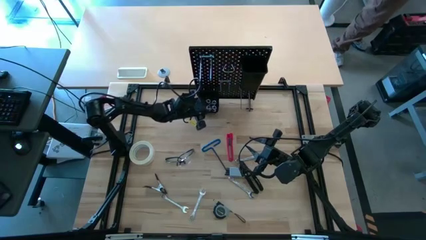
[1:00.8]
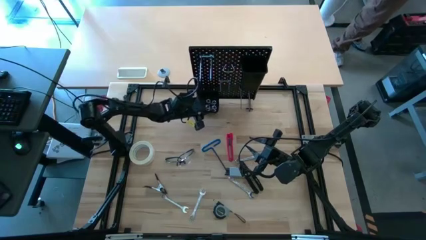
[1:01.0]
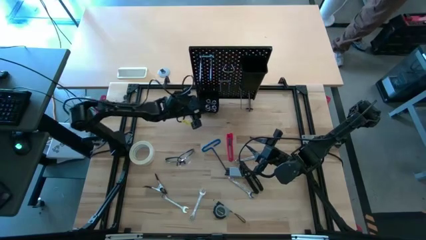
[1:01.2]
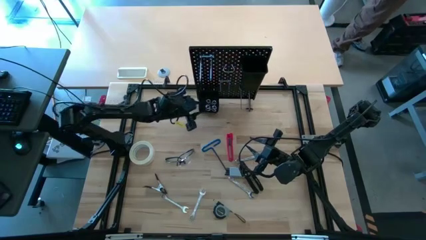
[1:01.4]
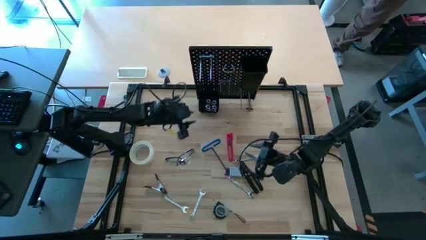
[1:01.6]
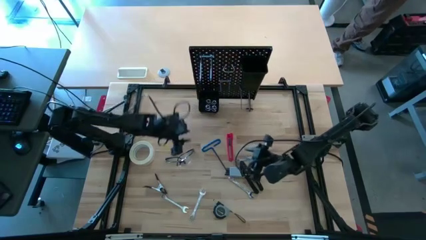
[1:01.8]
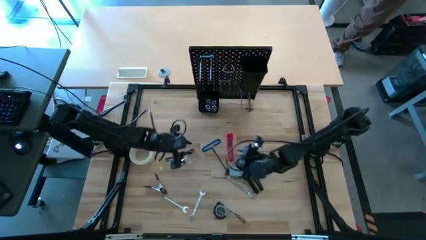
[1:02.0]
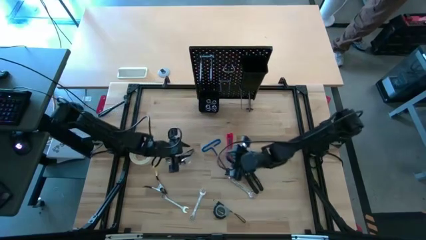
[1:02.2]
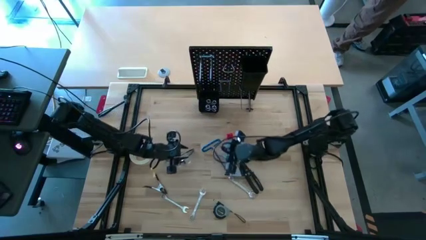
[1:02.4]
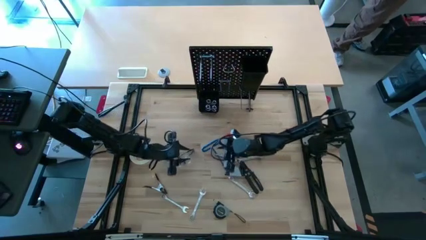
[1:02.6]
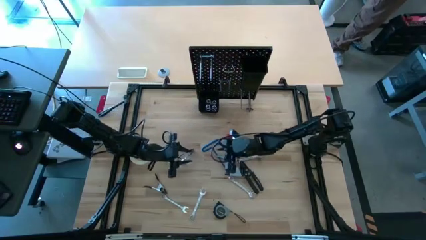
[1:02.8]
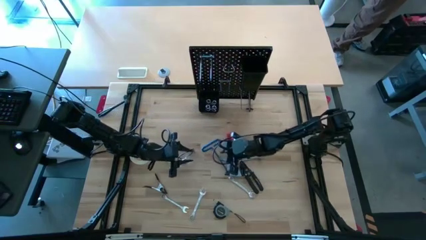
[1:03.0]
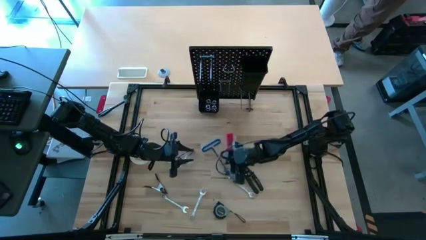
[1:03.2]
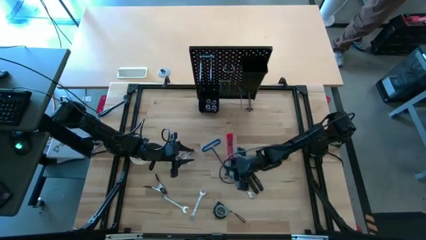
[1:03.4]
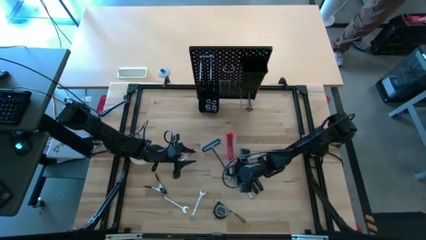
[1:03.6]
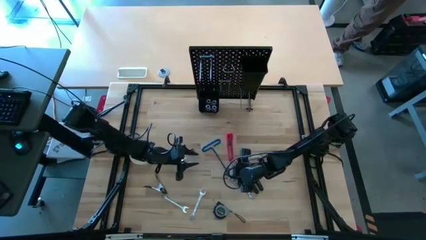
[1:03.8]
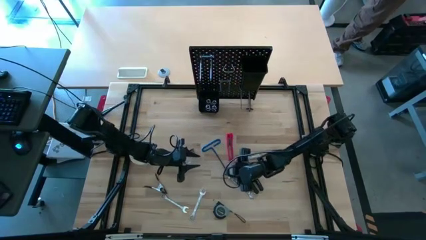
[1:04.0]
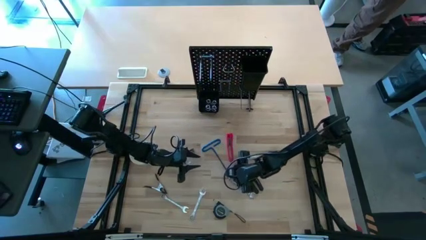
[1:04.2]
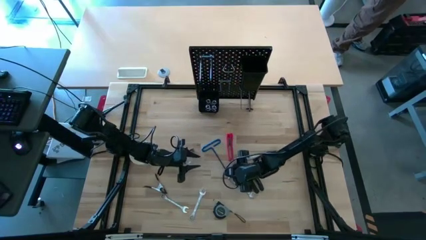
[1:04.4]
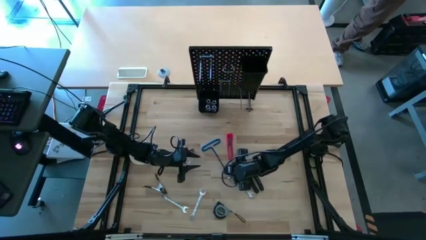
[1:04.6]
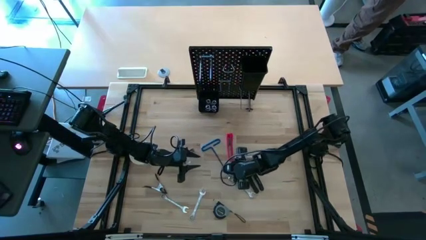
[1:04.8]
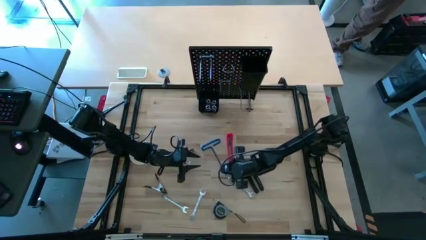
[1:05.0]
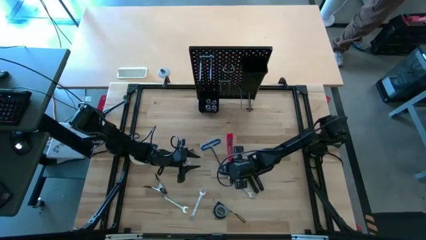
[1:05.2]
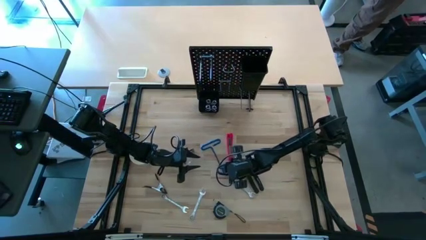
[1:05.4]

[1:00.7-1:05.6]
Task: Hang tools onto peg board
Put the hex key onto the peg board

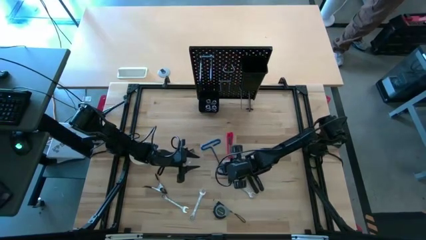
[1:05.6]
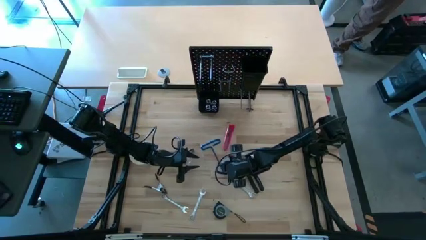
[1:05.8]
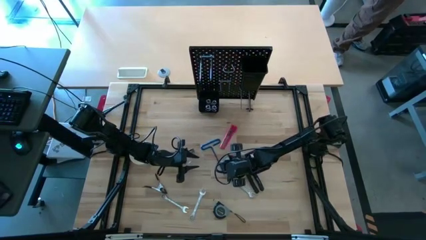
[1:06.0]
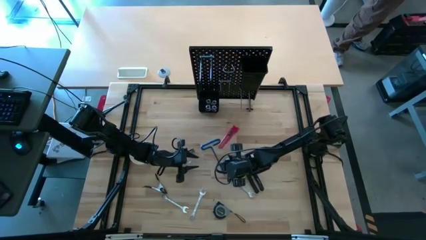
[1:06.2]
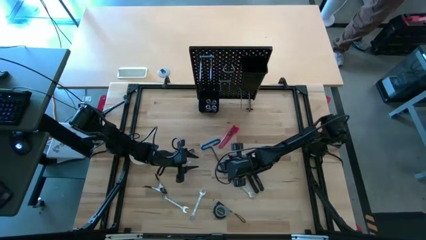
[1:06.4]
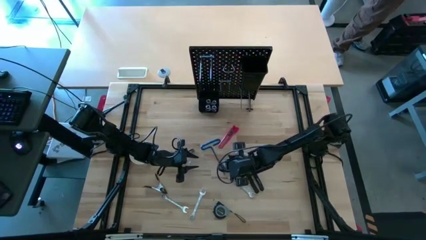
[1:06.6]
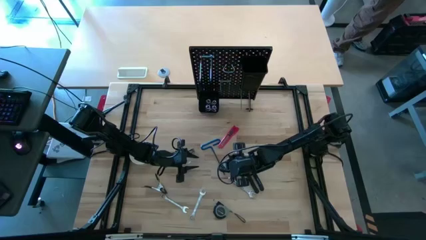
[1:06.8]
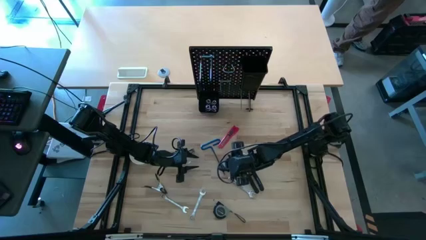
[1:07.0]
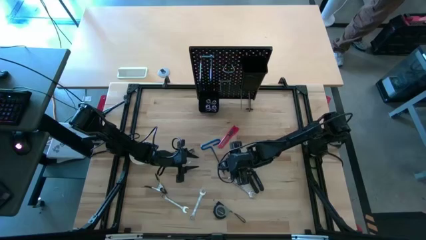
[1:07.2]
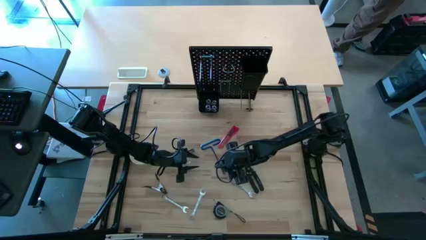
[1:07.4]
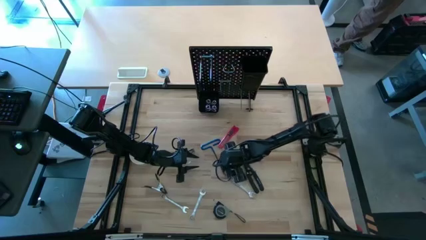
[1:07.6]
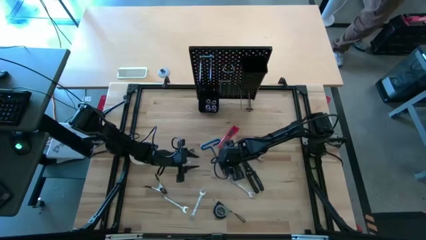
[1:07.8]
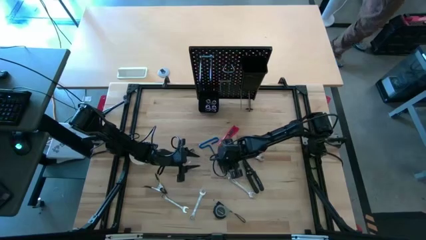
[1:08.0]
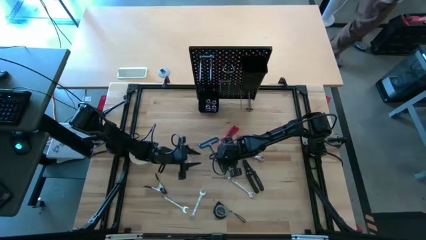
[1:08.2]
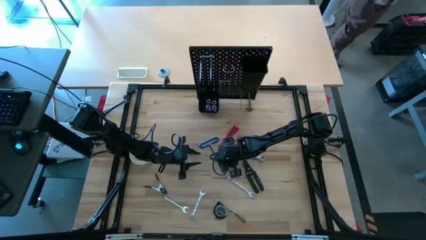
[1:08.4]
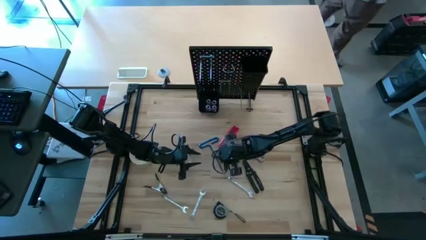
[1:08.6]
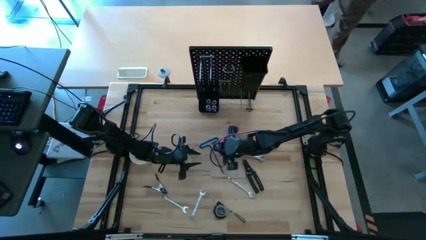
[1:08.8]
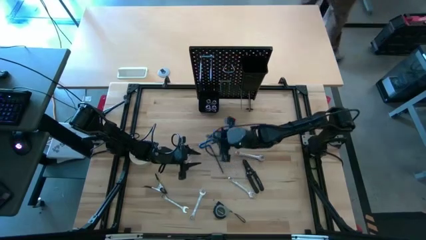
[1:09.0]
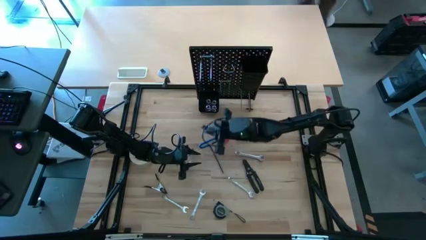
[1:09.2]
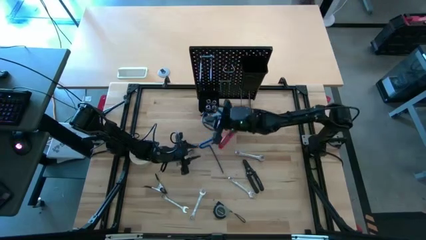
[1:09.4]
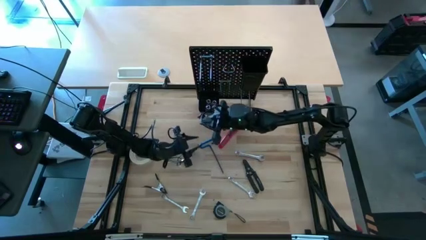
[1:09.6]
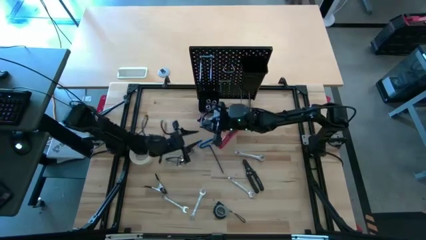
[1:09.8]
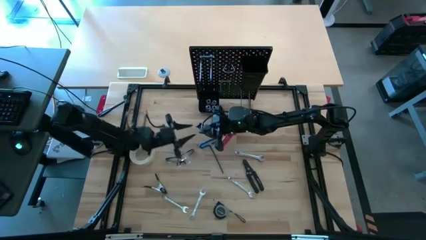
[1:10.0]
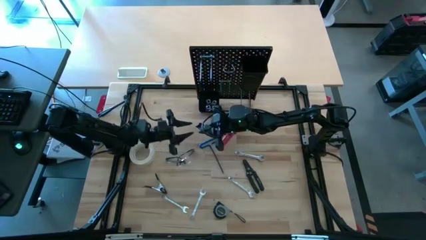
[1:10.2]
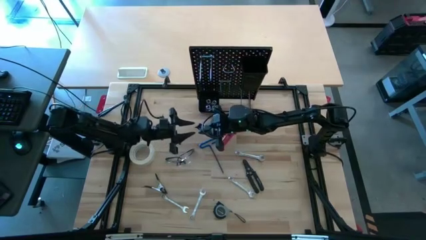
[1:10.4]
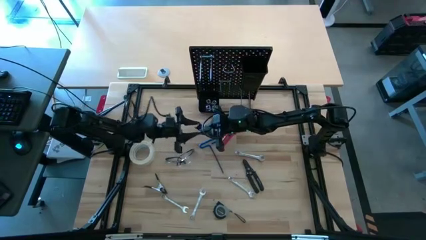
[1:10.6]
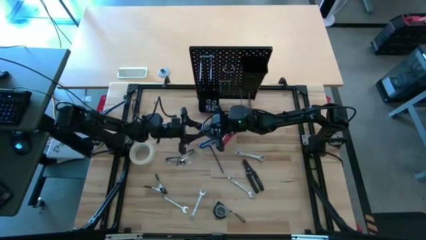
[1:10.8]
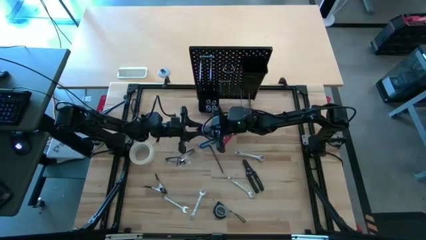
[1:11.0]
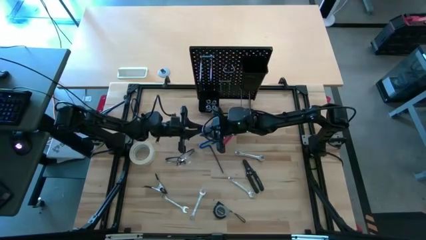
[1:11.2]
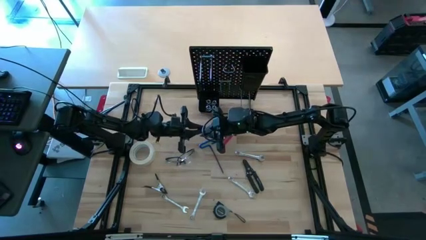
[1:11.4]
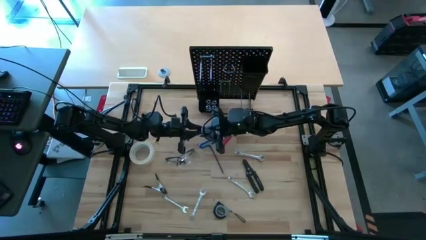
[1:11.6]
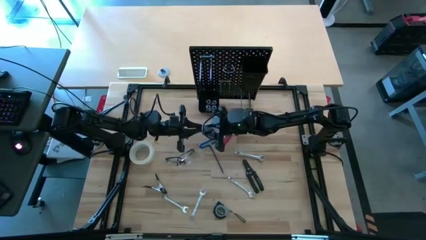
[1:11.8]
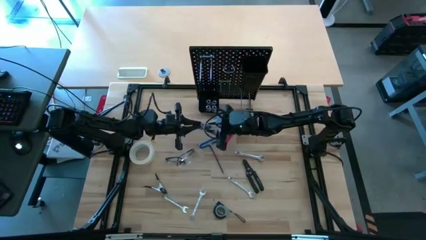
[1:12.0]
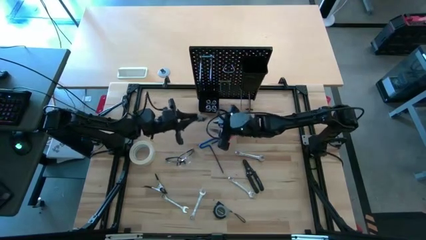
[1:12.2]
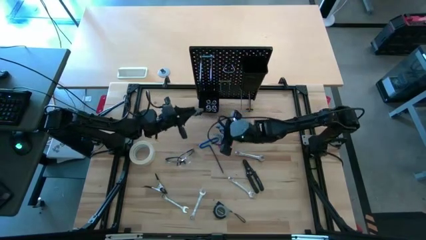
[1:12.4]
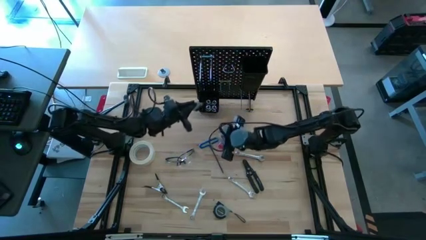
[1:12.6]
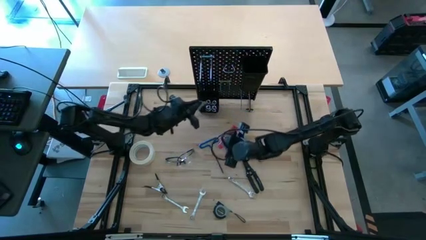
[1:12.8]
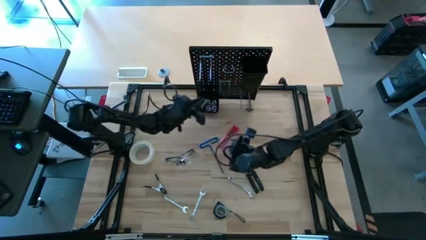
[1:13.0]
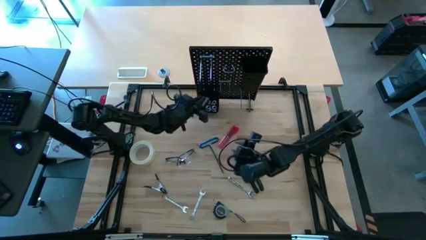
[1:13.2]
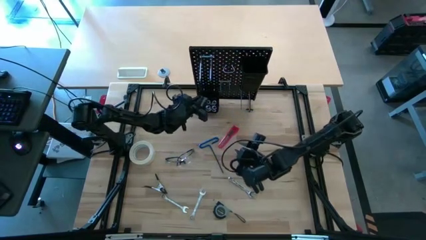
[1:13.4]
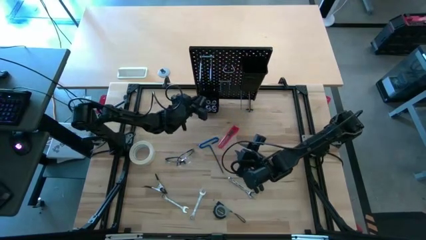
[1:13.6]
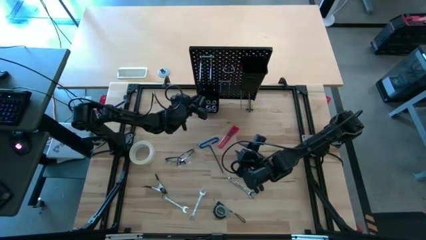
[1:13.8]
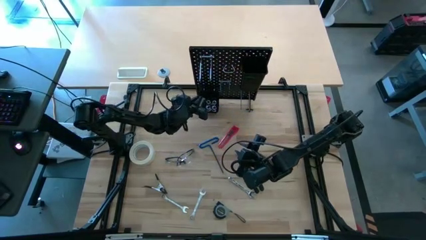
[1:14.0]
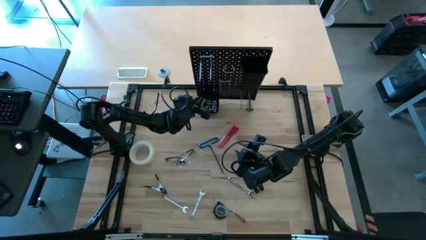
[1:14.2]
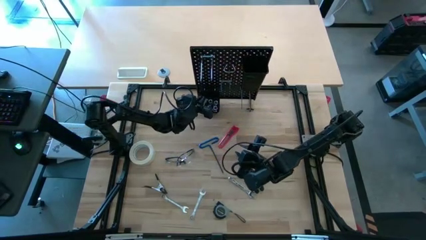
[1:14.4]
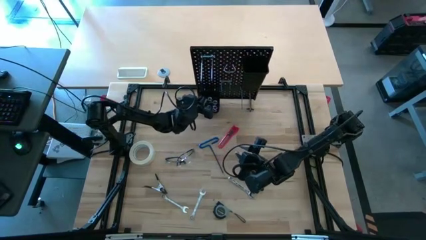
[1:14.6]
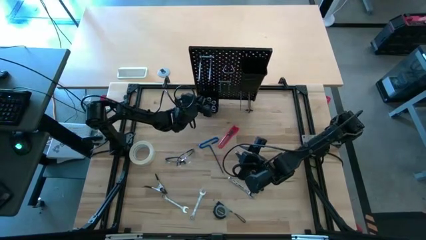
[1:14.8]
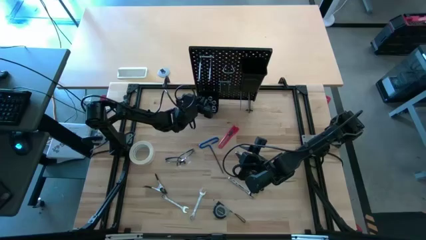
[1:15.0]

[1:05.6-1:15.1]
Put the hex key onto the peg board

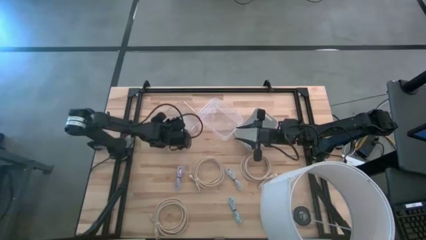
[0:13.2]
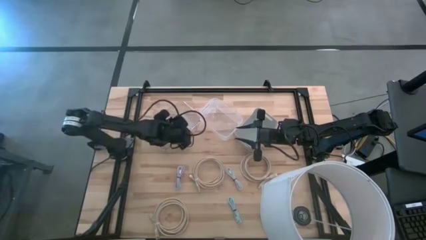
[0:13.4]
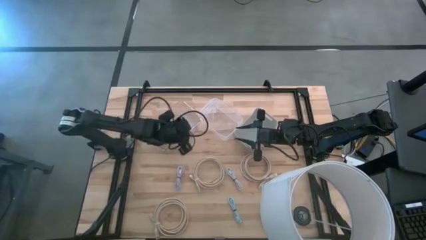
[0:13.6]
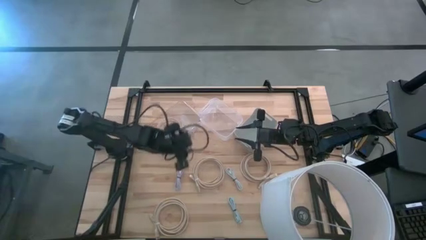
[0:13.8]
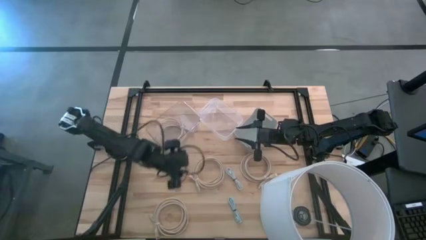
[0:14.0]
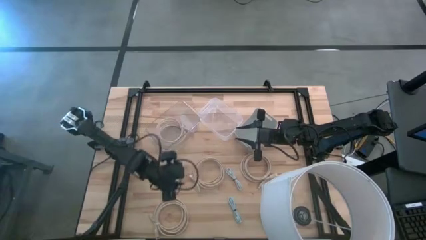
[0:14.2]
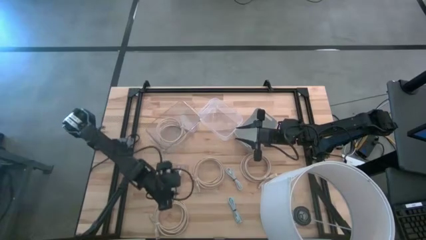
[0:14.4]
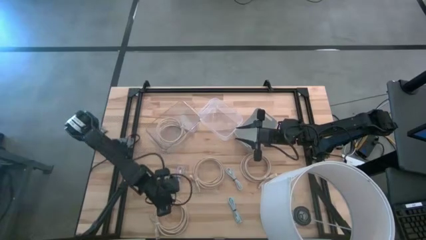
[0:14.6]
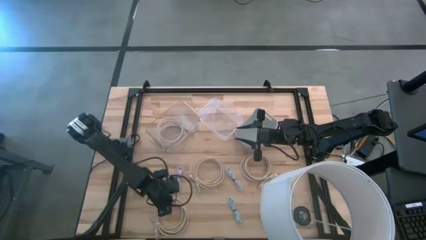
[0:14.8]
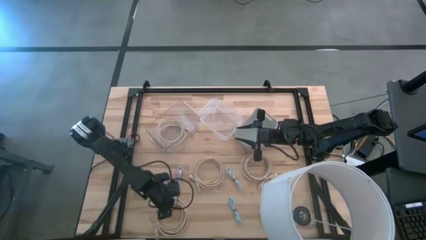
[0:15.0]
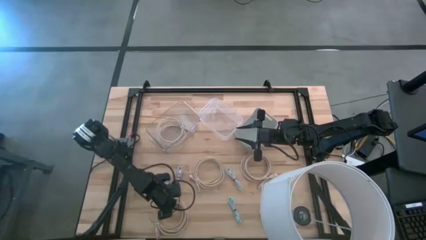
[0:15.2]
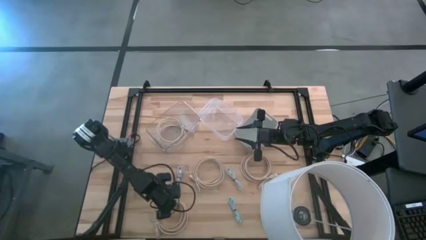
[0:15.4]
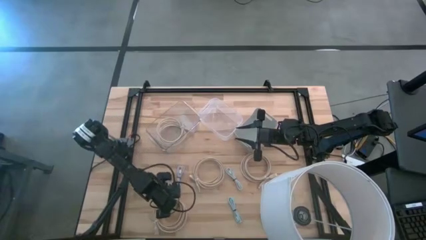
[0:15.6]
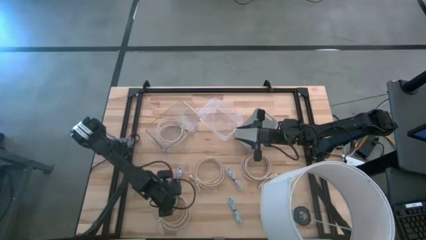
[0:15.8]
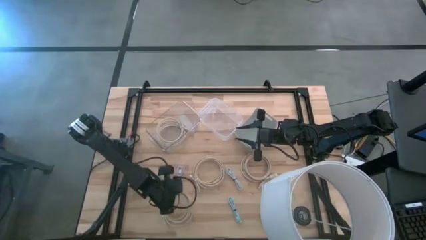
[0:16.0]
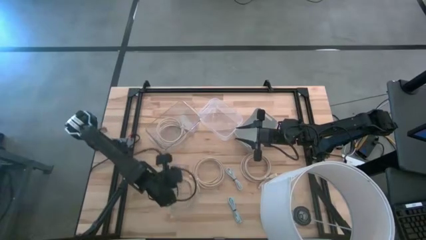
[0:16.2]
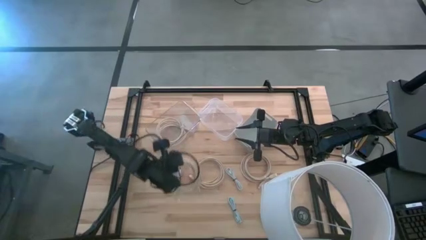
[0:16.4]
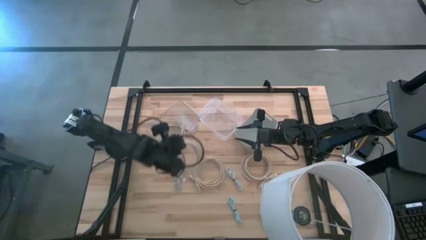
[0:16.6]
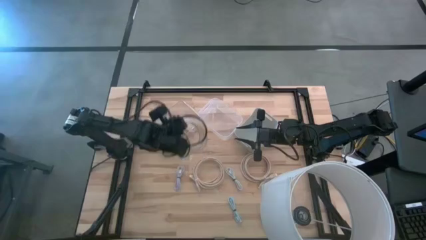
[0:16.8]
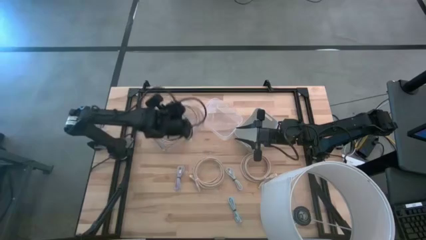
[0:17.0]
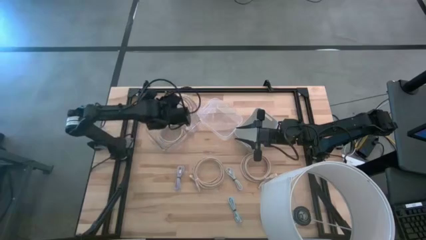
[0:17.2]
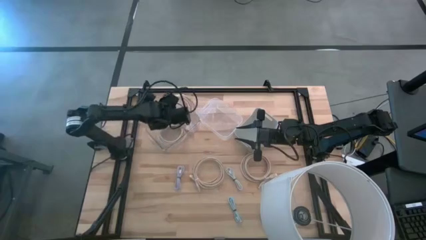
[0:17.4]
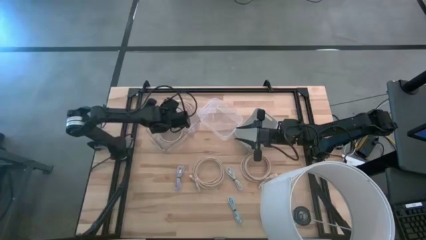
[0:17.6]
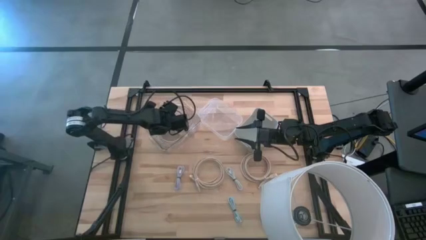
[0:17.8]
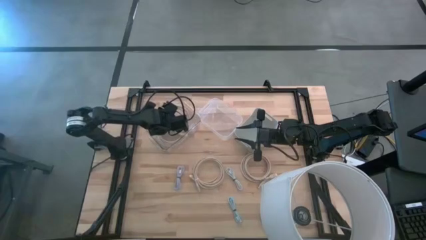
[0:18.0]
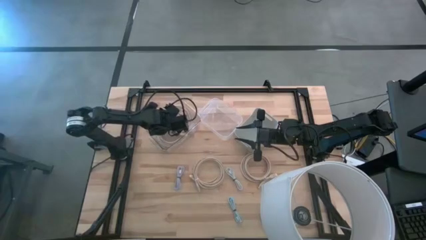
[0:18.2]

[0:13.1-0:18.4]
Task: Pick & Place USB Port
Put the light brown HDMI cable into the left transparent bin
